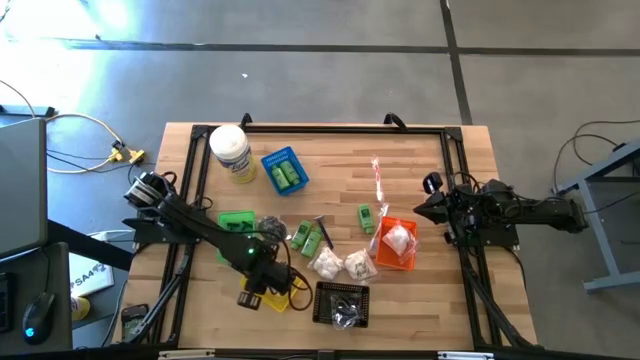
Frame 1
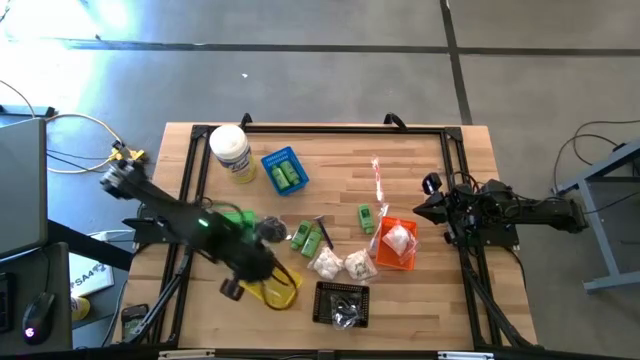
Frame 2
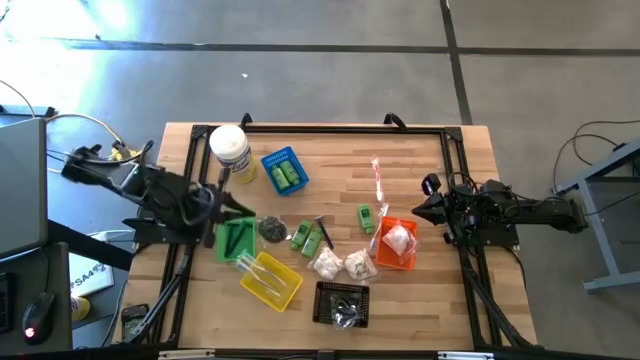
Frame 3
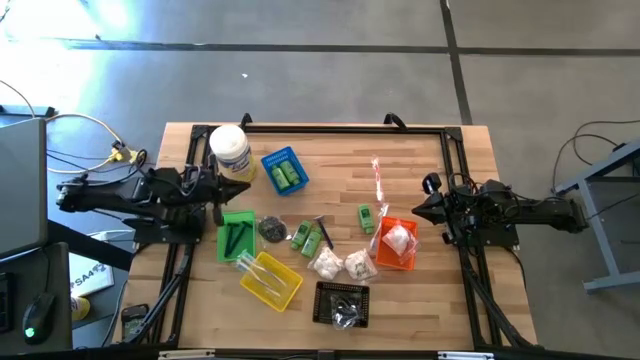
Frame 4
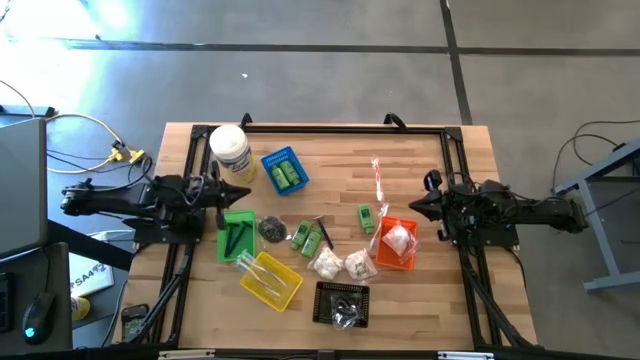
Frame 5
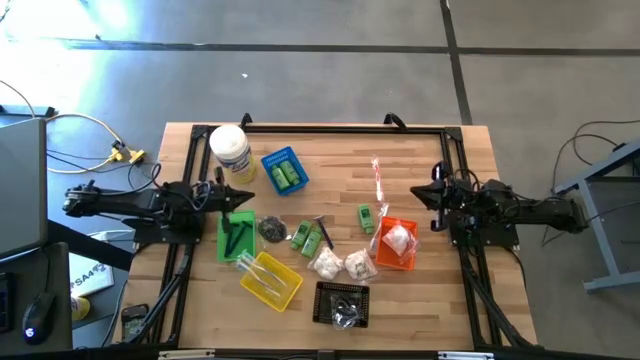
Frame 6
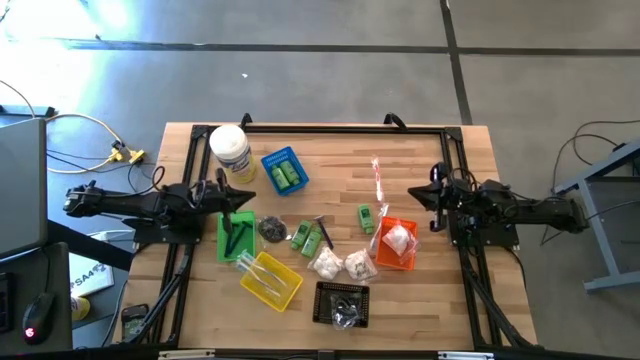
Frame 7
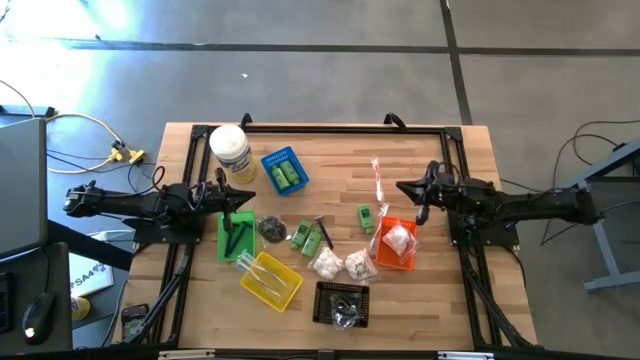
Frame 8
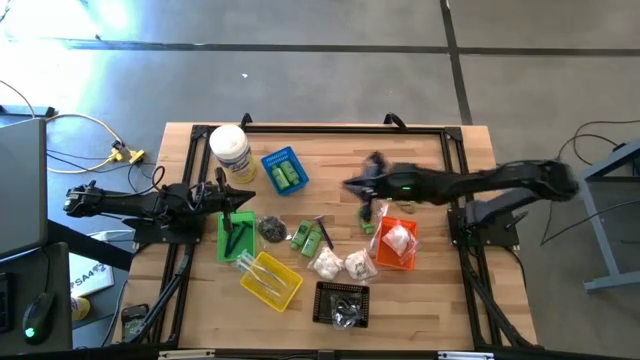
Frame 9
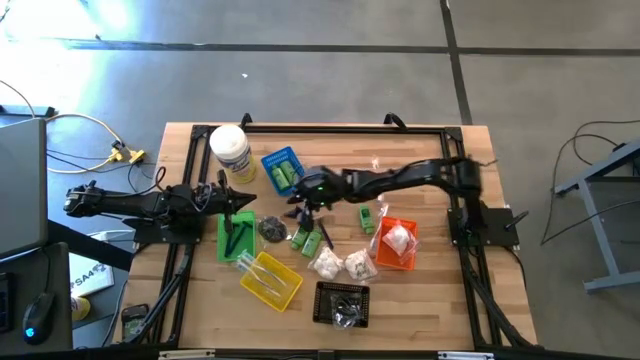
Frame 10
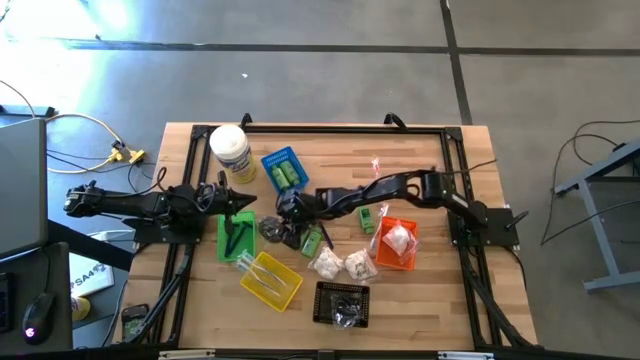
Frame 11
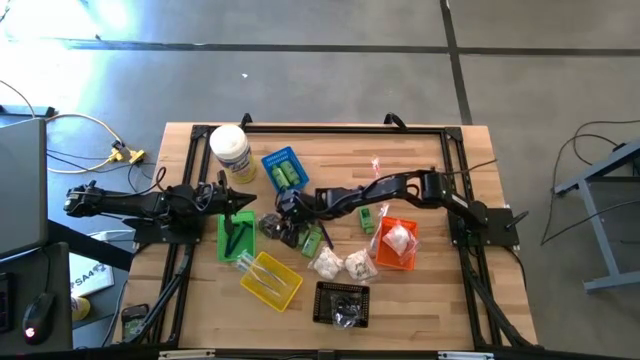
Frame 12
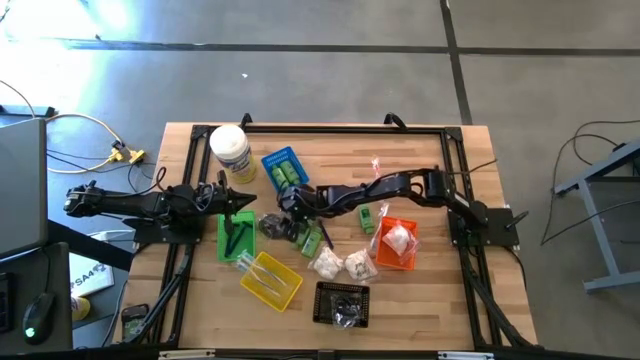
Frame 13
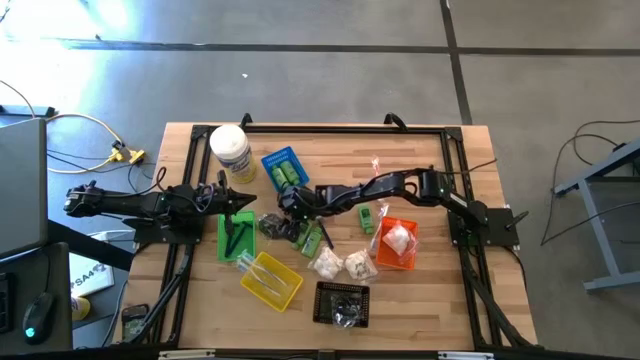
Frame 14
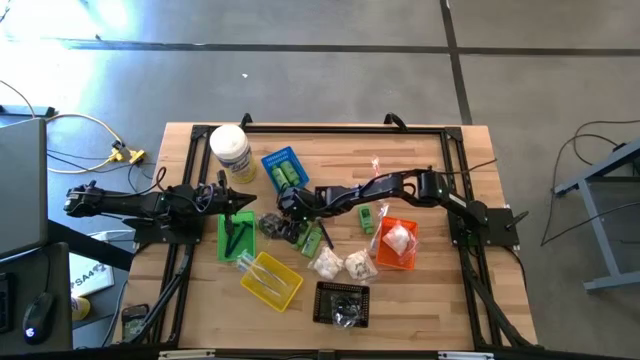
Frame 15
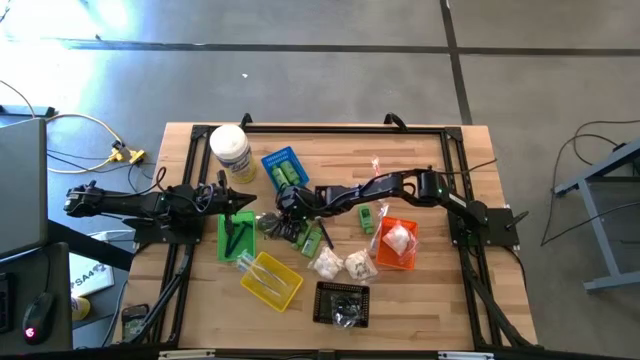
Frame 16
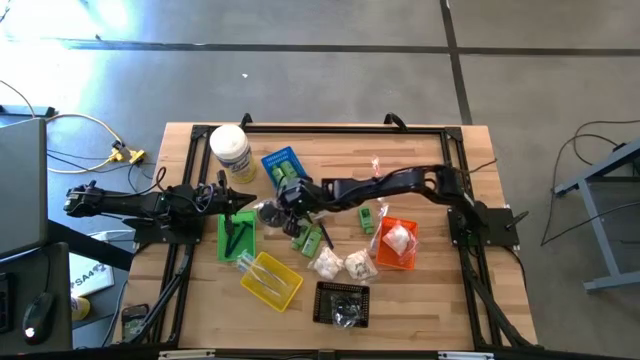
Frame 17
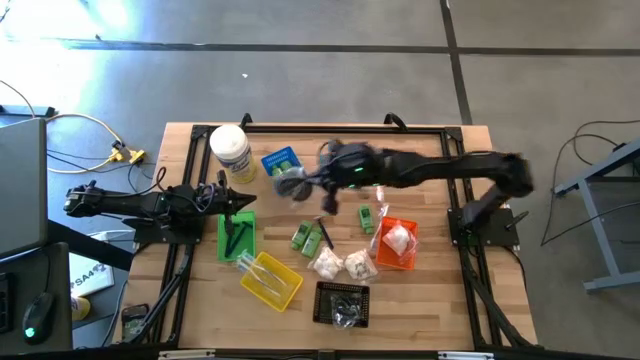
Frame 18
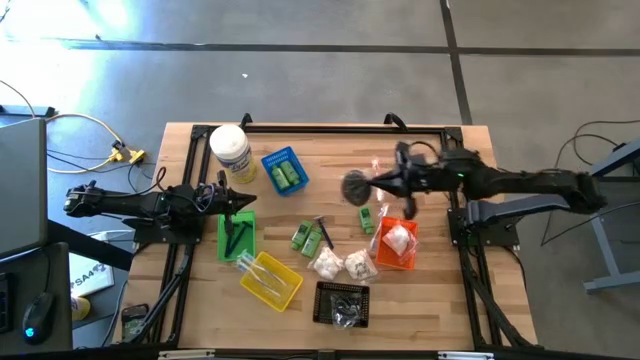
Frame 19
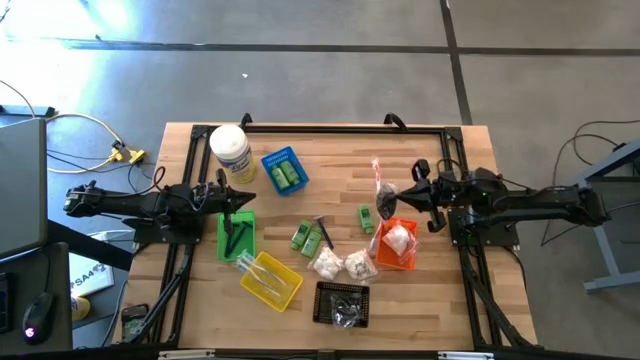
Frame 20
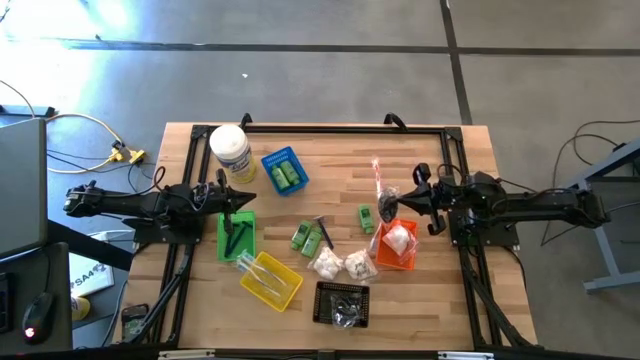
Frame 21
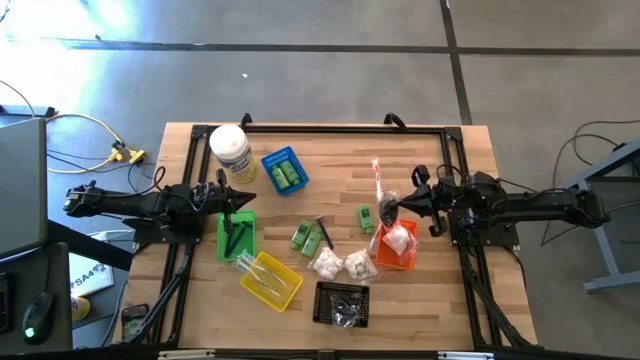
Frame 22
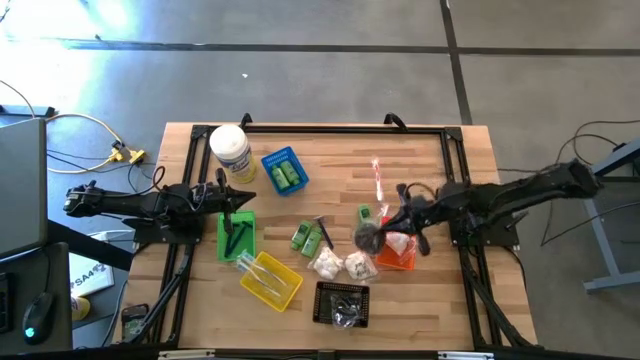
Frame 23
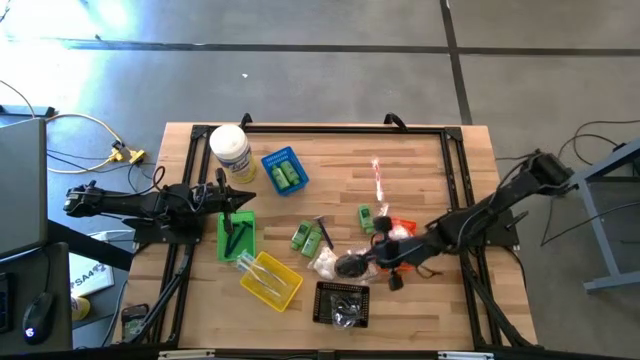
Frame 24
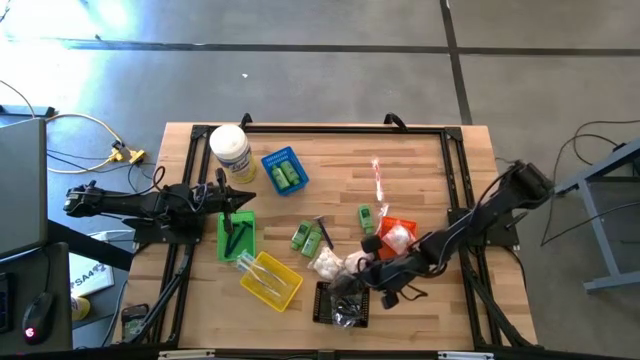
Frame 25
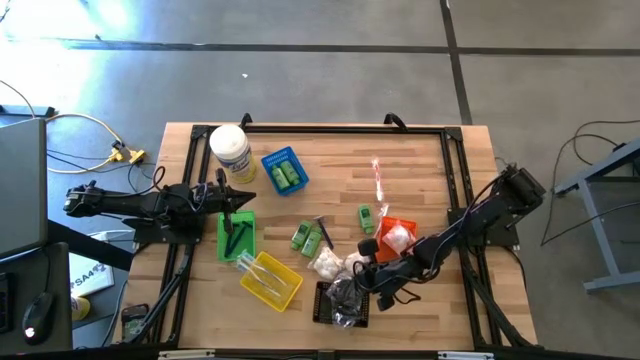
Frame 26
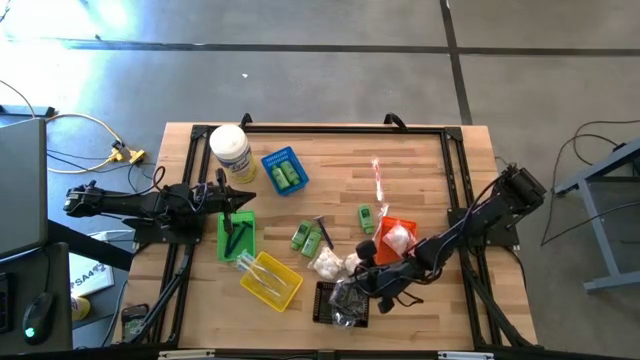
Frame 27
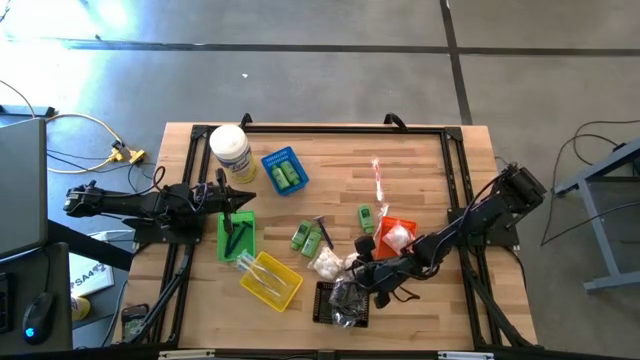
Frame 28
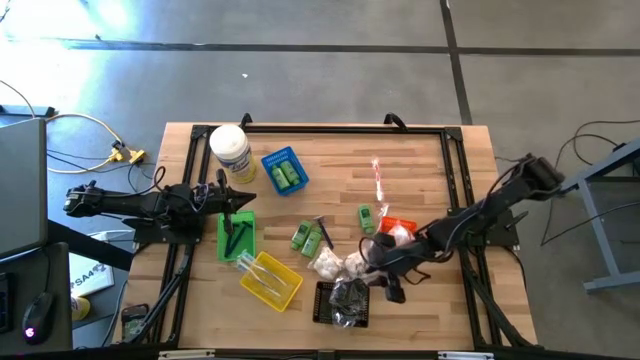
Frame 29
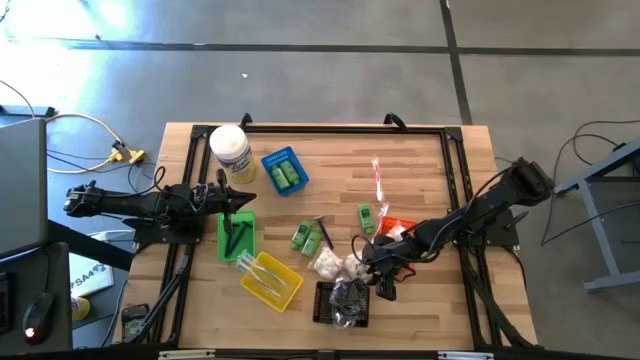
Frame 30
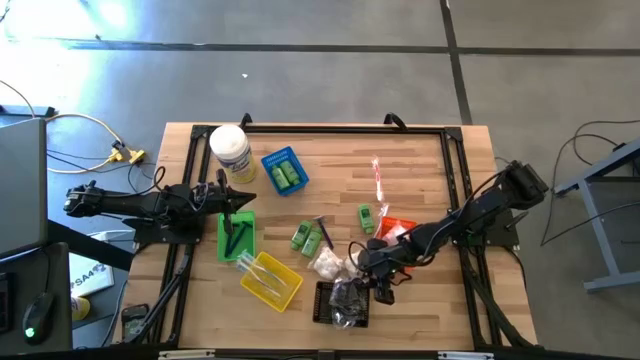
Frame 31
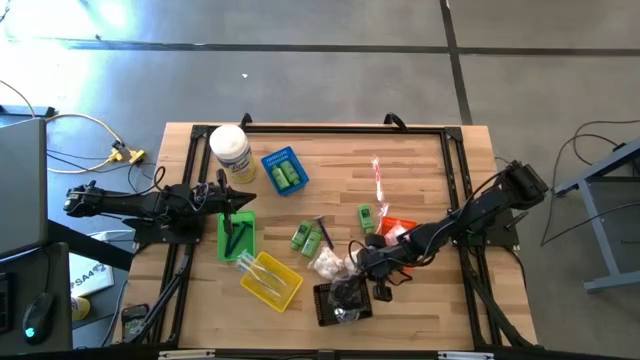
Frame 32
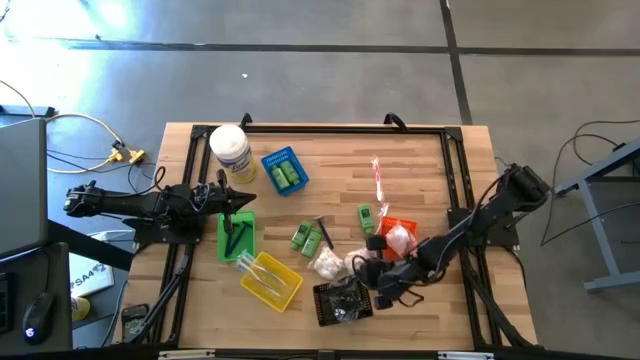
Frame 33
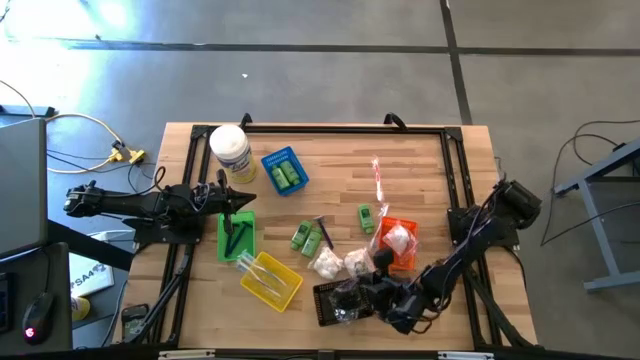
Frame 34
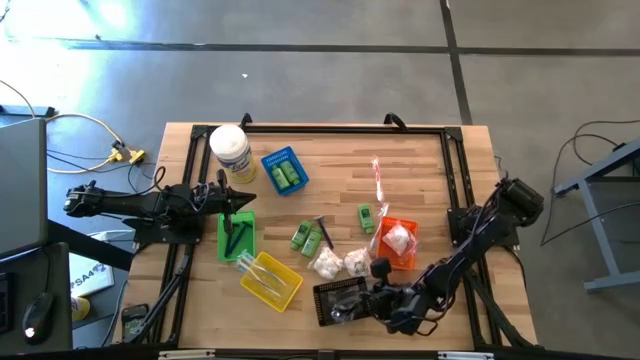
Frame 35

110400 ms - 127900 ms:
Task: Pick & Place Travel size toiletries
Put the black hairbrush into the black bin

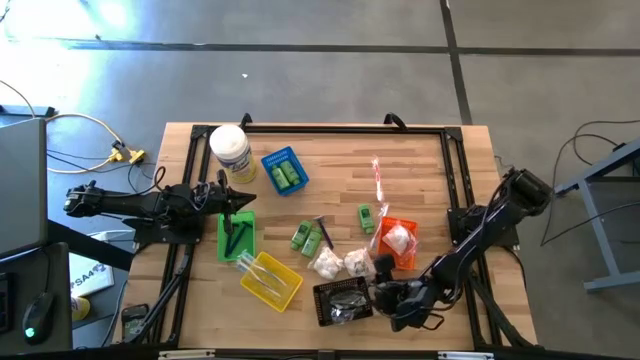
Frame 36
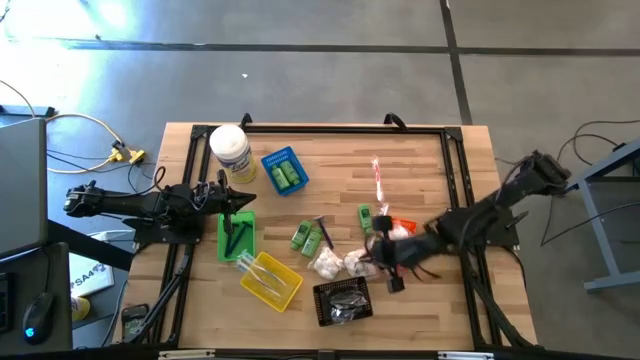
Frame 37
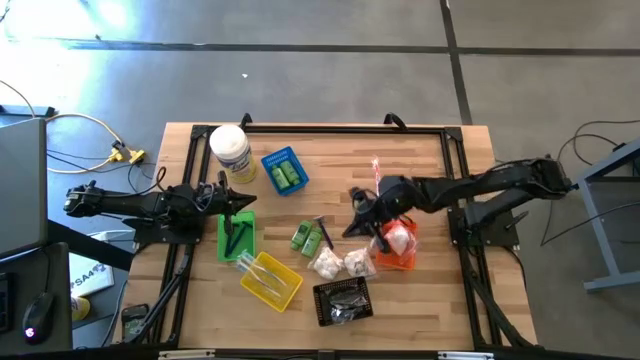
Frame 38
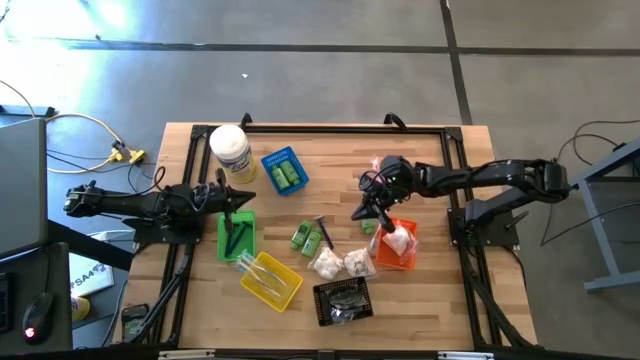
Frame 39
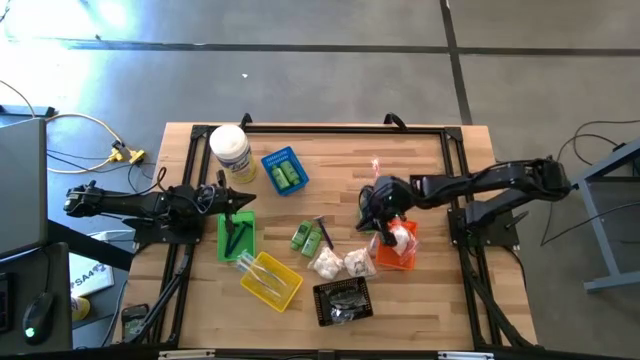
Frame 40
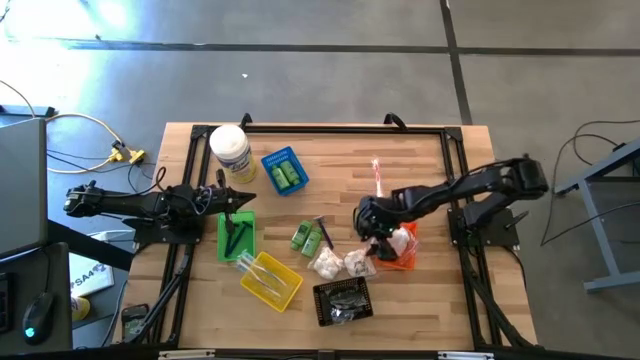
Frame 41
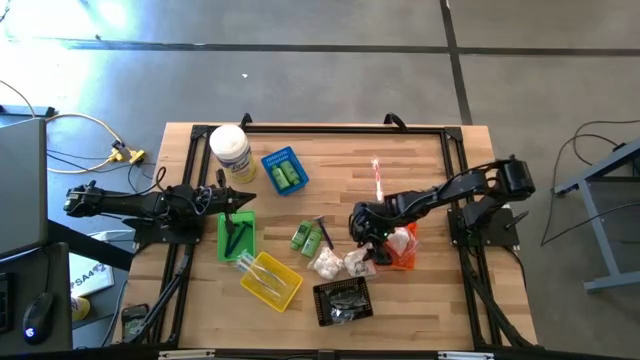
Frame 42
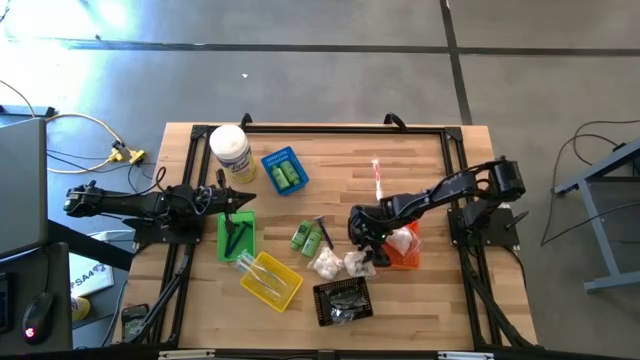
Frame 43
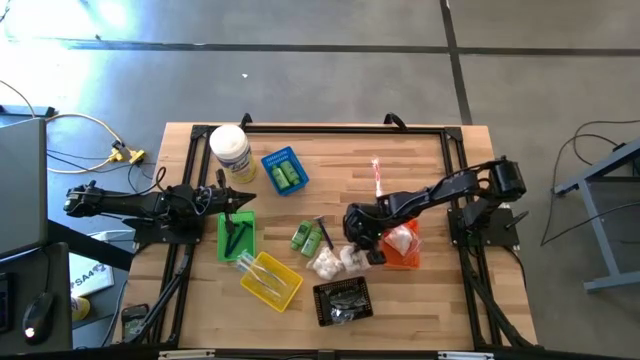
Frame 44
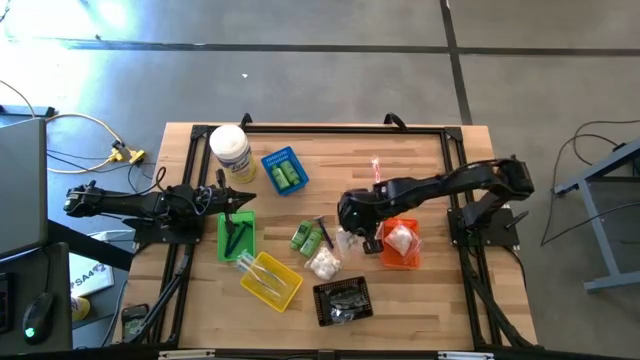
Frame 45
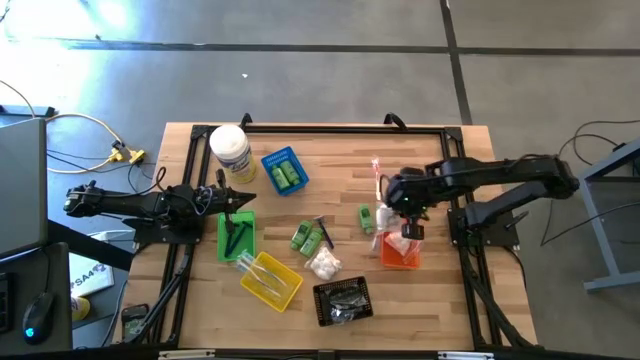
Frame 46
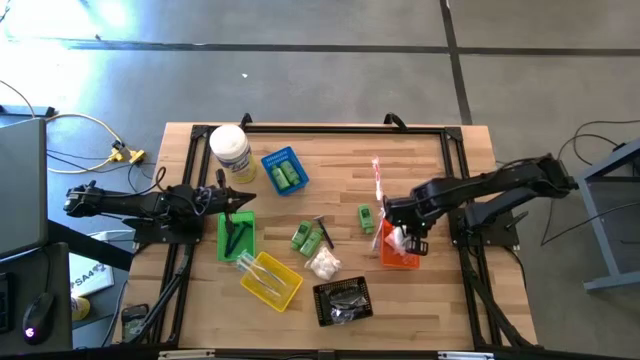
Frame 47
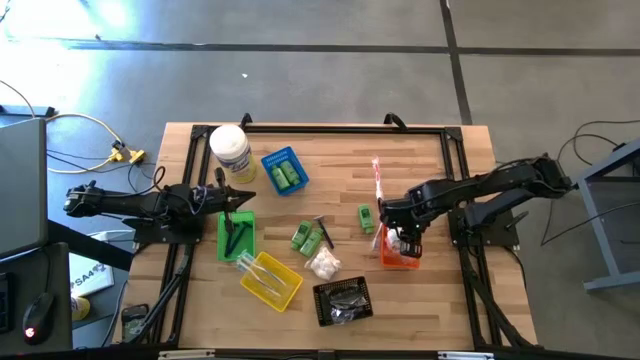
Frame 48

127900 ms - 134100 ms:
Put the white cotton pack into the orange bin
